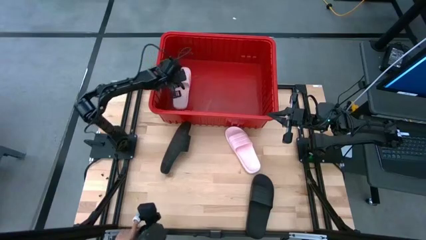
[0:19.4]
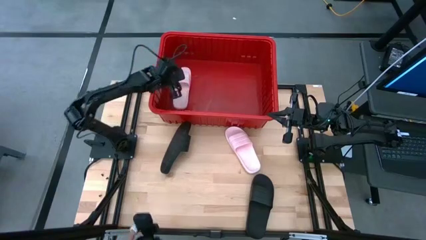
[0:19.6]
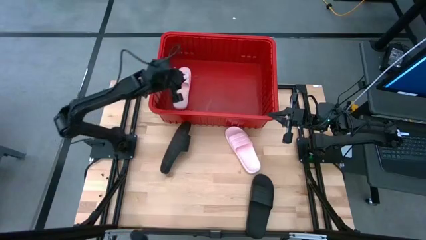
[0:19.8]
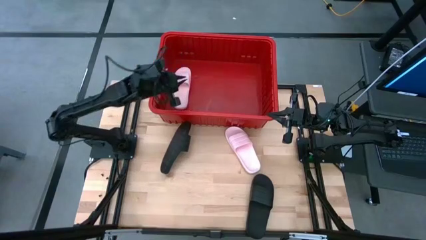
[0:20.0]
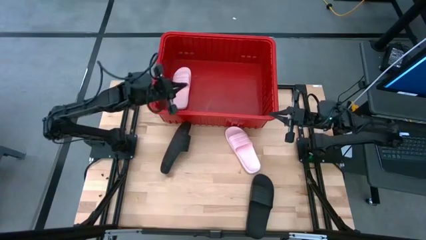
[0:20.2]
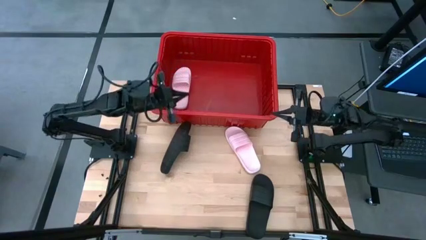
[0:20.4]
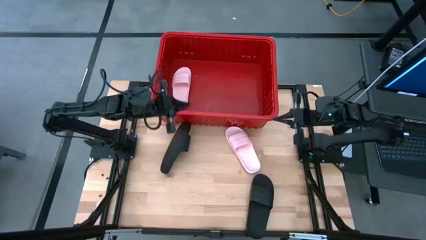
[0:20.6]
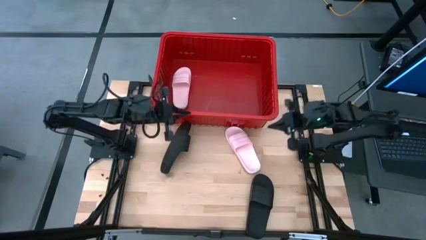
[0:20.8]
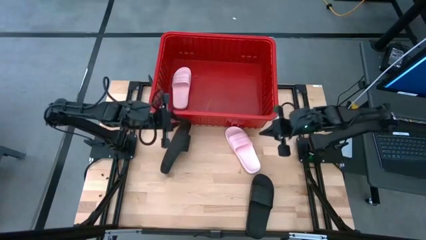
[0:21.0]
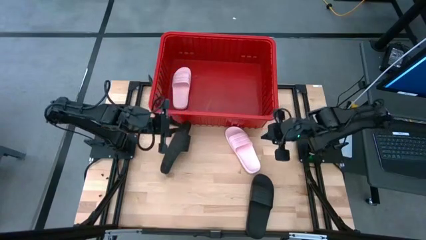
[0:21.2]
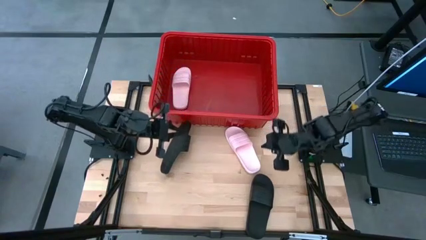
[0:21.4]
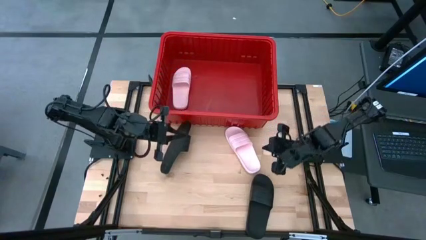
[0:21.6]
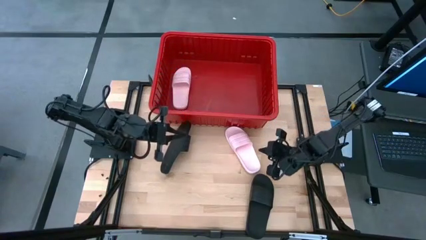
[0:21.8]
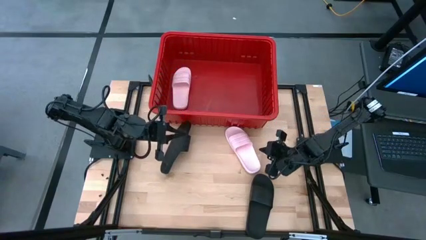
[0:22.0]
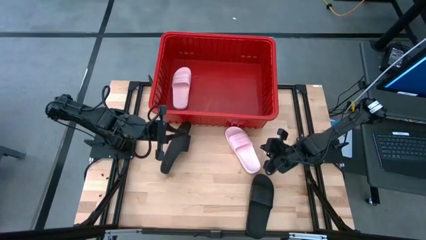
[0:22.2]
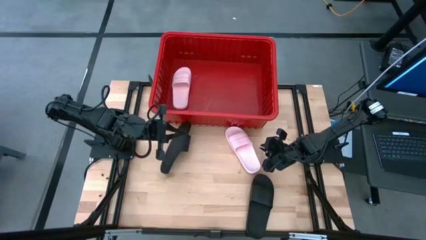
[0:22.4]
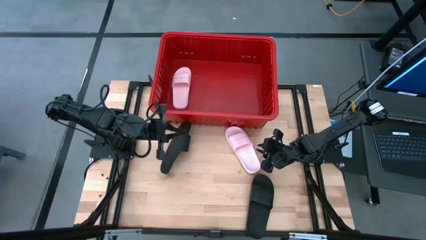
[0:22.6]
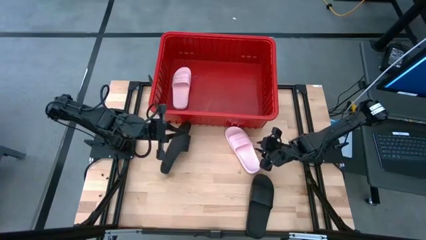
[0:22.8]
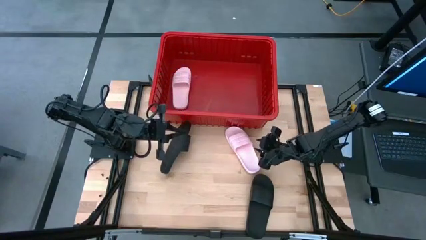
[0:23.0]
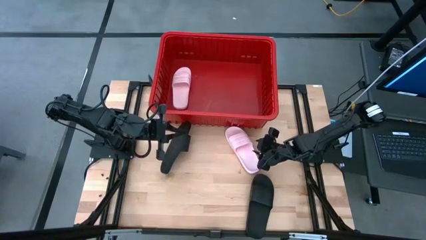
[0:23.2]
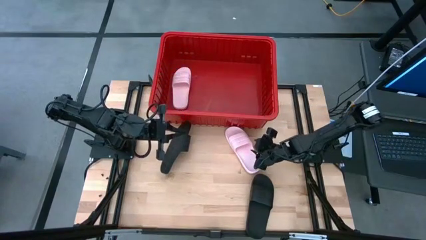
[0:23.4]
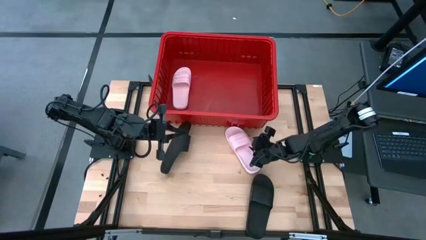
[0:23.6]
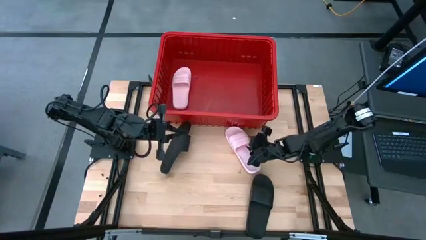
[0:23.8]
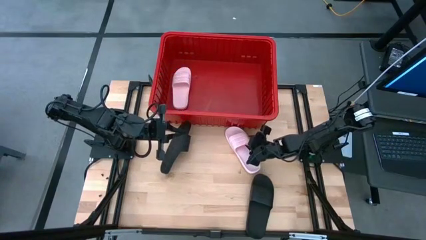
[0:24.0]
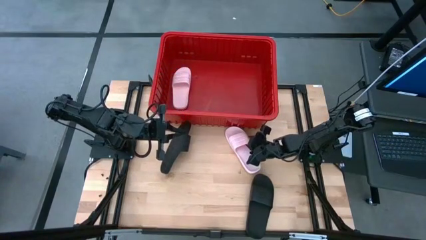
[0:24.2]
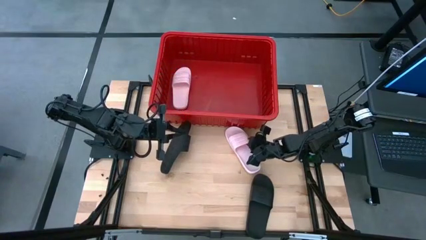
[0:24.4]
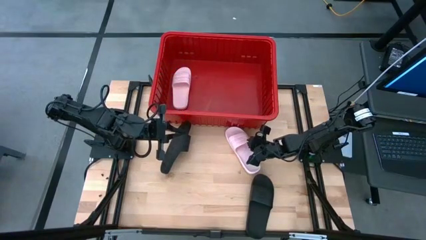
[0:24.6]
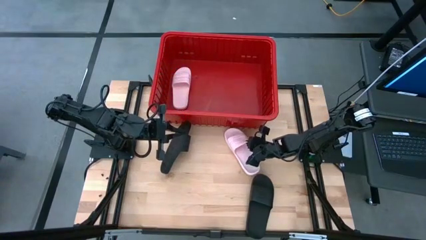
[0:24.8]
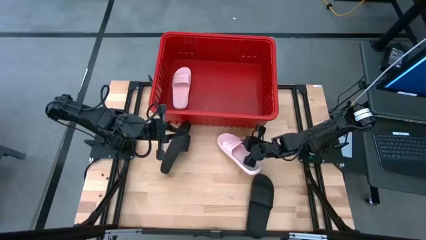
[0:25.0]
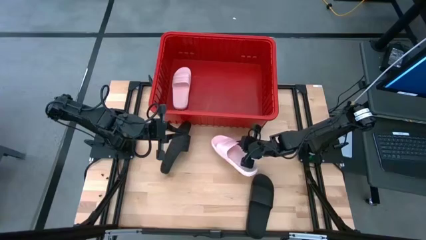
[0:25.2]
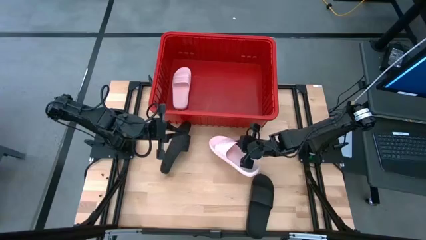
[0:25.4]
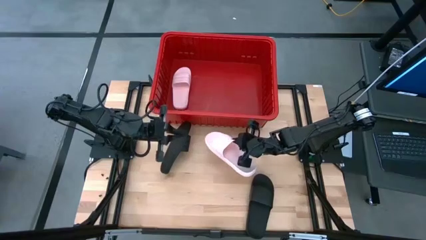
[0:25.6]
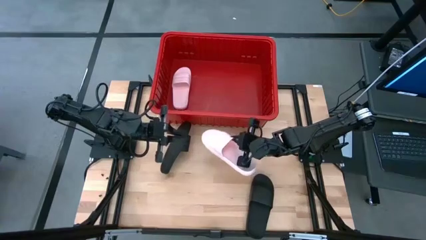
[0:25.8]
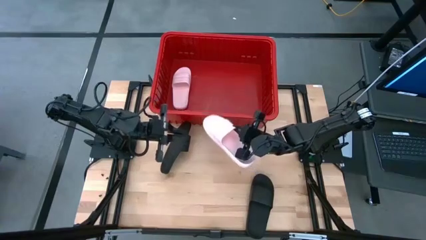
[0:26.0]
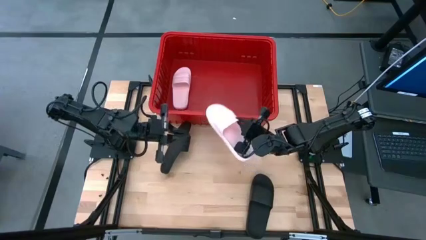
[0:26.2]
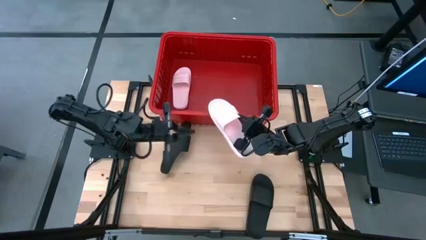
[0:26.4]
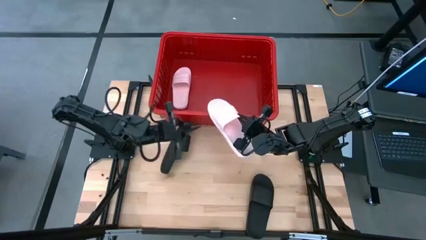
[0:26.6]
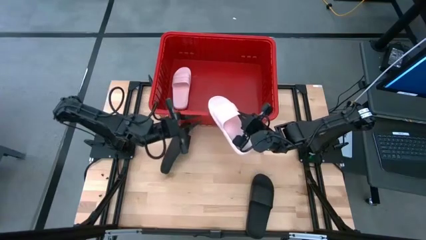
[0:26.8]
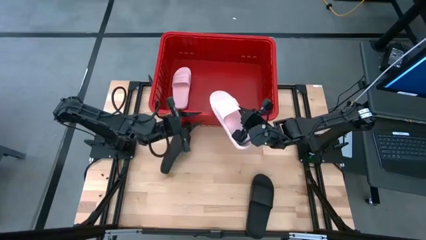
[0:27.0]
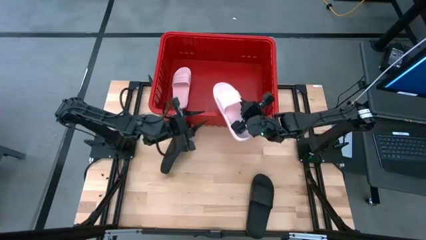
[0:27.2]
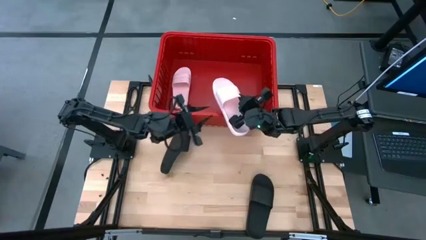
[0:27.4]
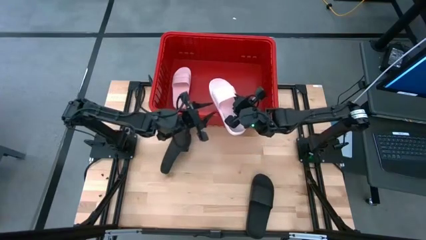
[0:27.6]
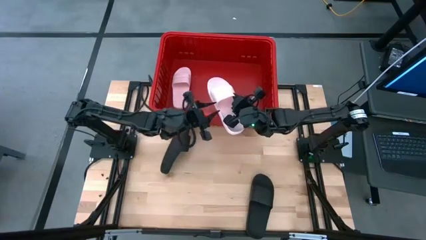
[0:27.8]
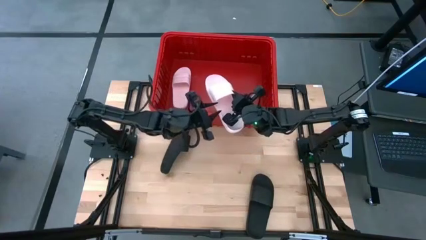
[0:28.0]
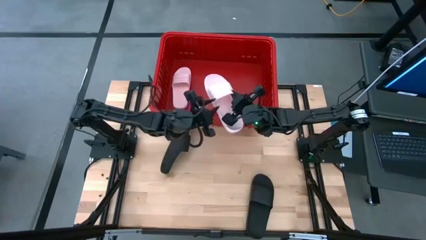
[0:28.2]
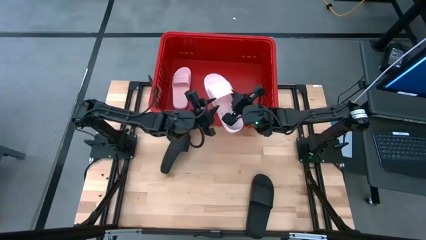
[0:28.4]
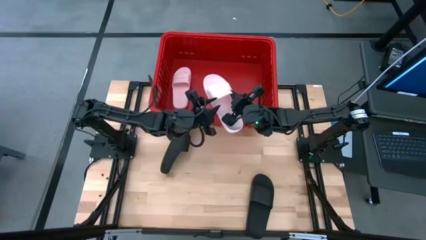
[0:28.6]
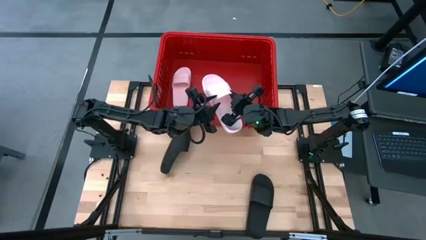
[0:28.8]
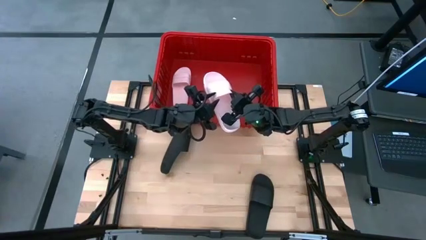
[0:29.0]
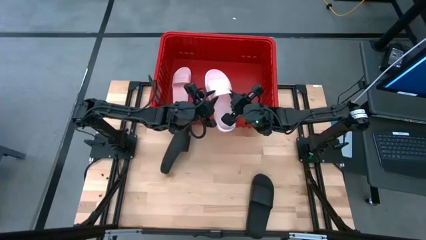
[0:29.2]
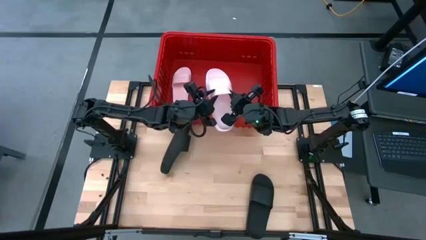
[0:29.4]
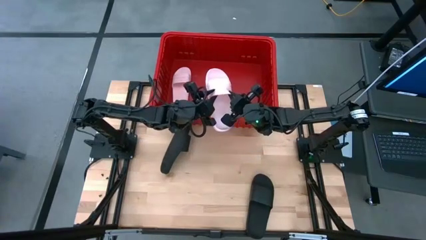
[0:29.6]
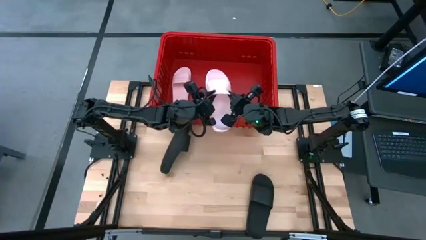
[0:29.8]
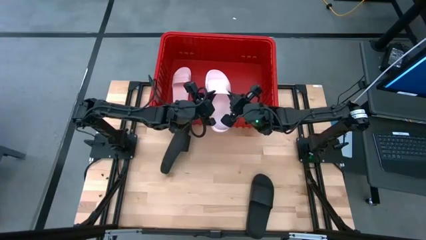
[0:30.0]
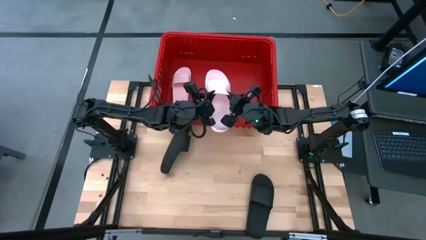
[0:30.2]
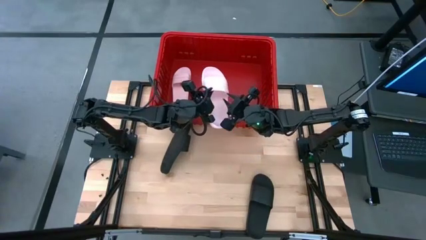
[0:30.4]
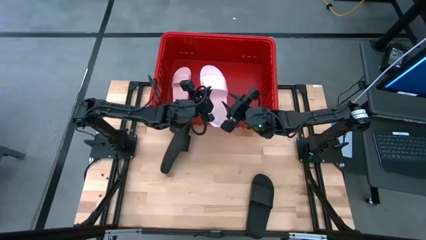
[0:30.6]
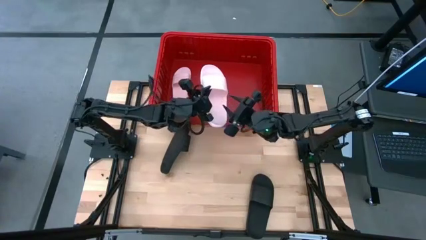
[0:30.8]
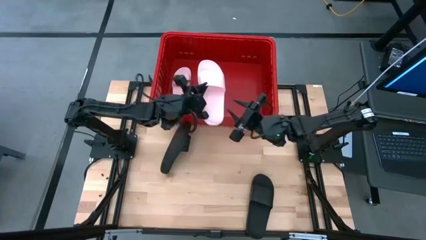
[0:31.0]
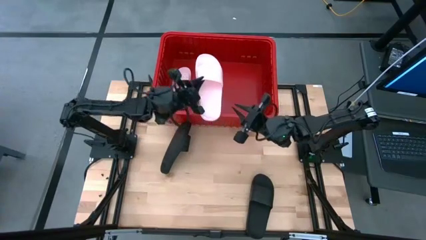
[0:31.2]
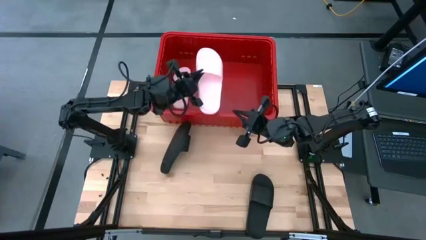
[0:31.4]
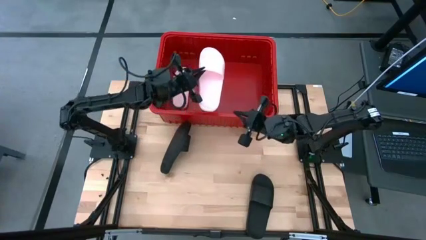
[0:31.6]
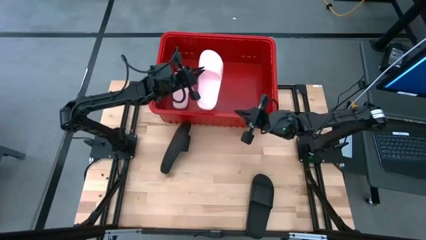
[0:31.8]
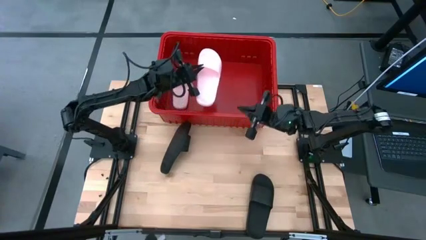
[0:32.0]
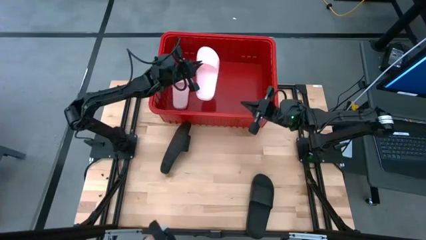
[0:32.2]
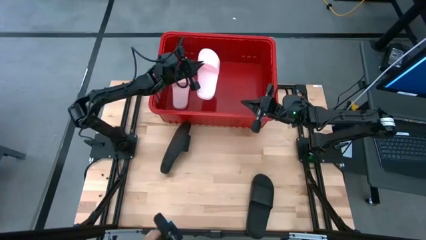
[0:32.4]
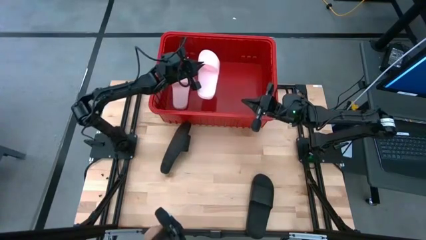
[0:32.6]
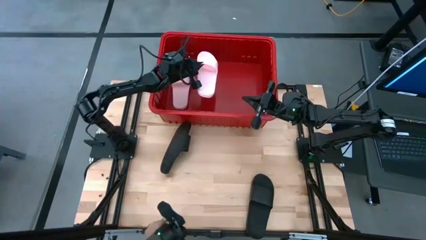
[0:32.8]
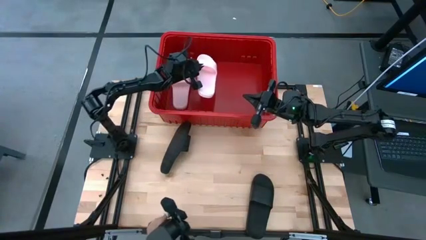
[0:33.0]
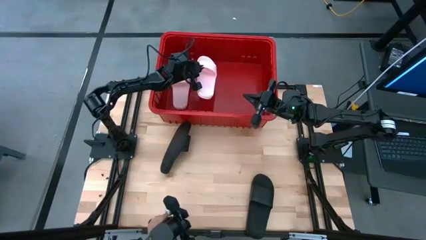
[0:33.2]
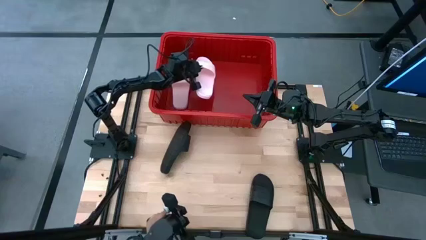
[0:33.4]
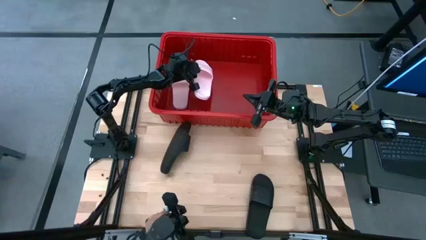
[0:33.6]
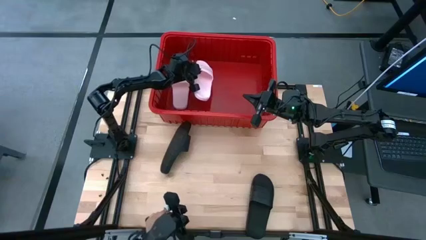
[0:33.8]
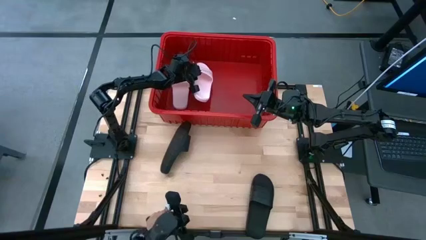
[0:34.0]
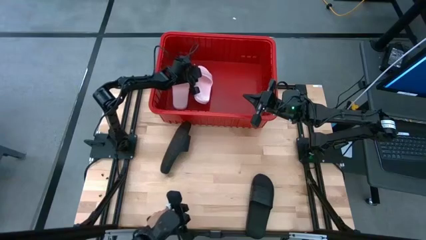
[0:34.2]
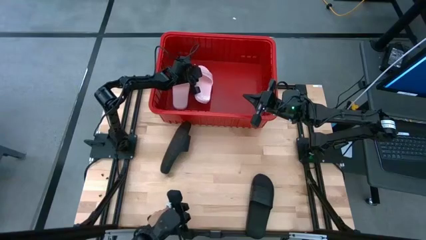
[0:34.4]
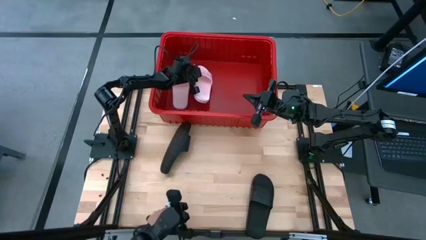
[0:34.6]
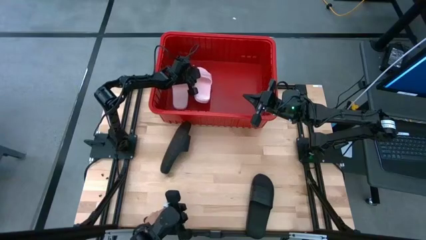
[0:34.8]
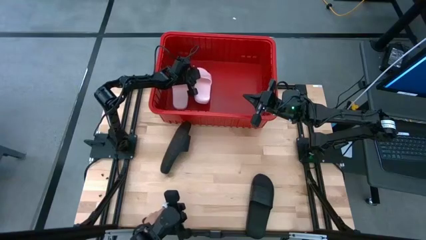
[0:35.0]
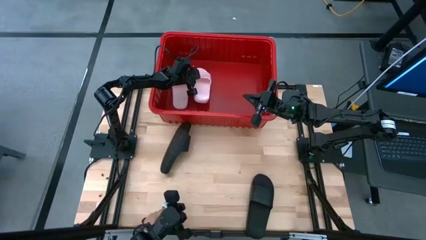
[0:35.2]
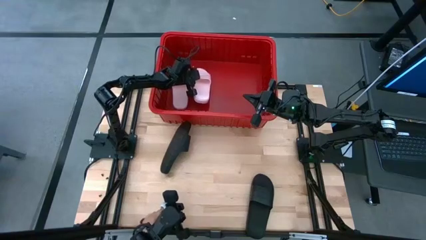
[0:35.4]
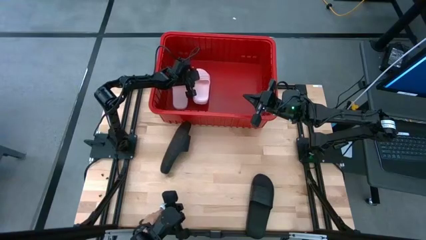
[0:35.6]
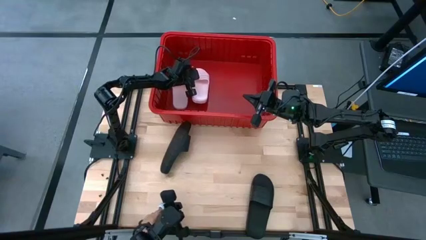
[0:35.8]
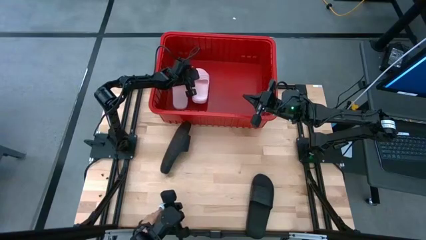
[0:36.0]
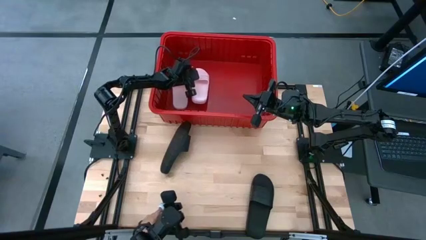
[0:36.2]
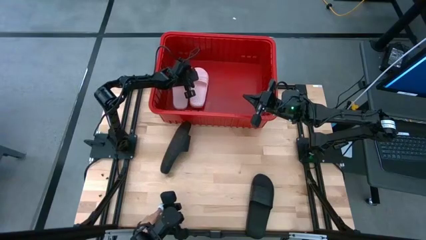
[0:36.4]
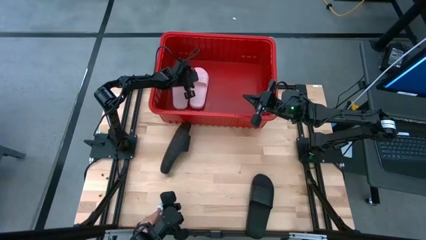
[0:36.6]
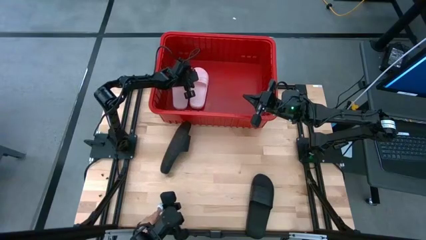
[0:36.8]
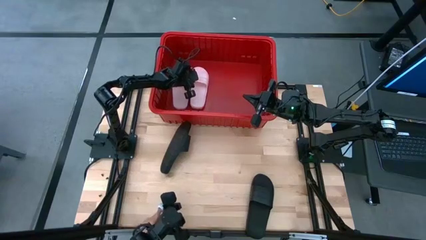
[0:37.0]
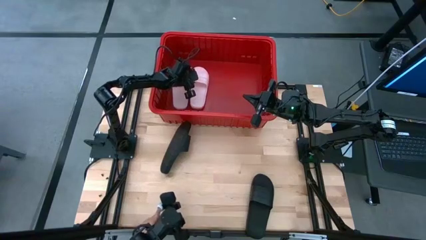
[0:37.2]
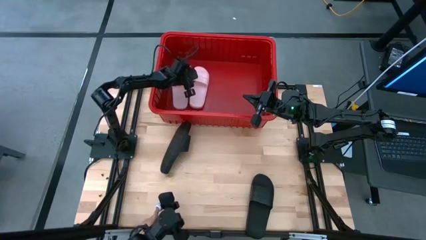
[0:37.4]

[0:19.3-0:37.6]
Task: Pick and place slides into bin
Put the pink slipper into the red bin
